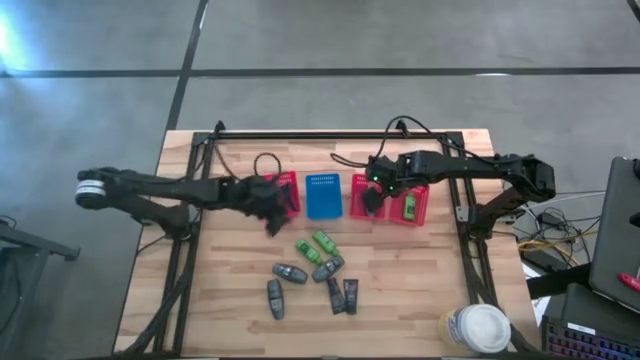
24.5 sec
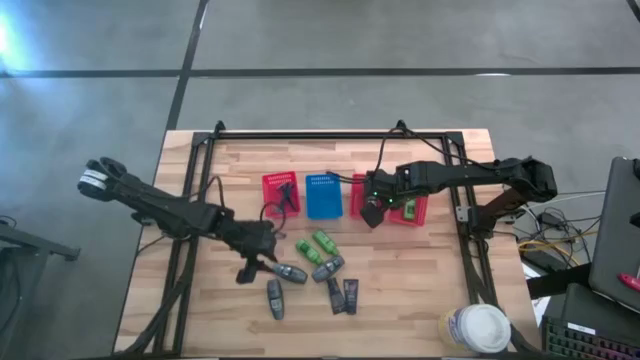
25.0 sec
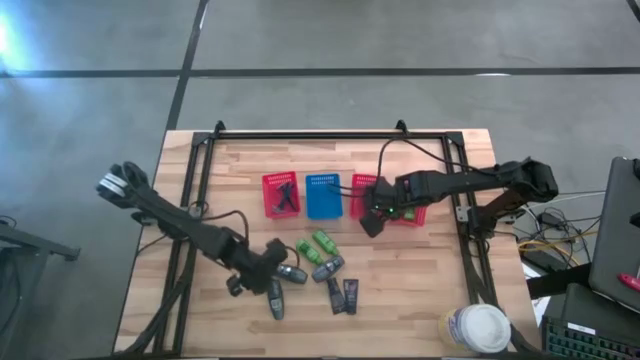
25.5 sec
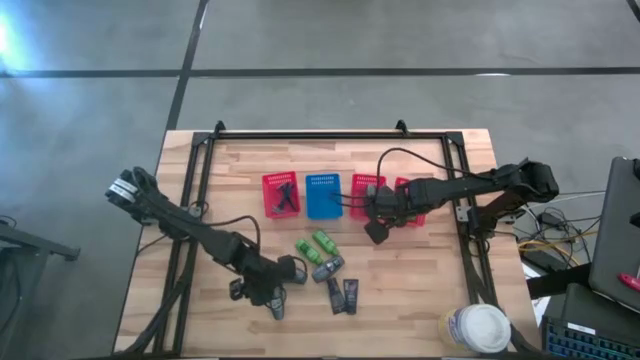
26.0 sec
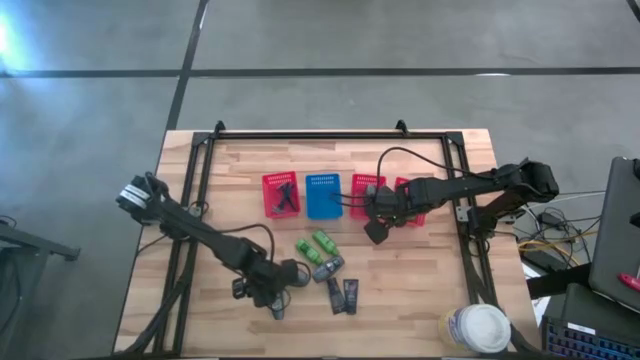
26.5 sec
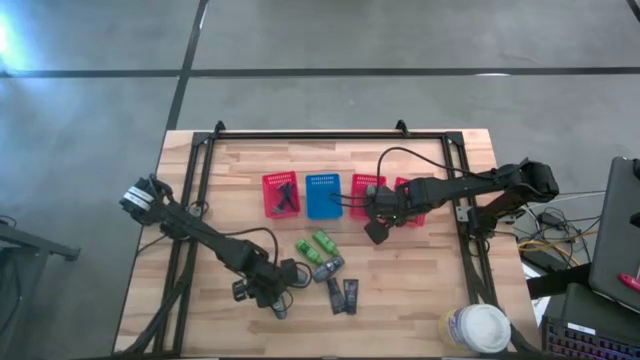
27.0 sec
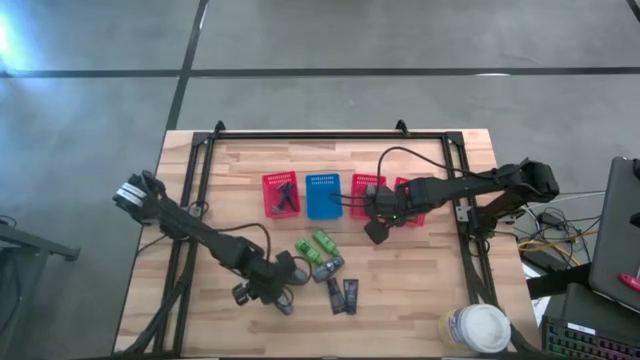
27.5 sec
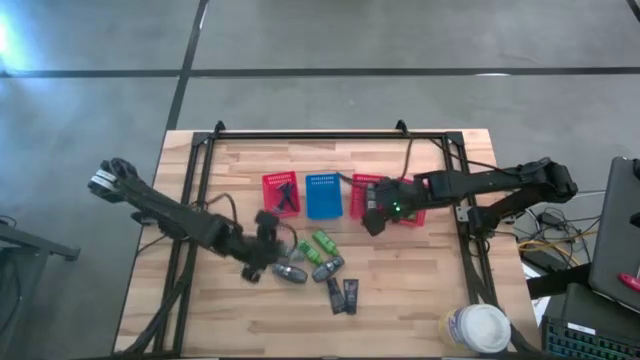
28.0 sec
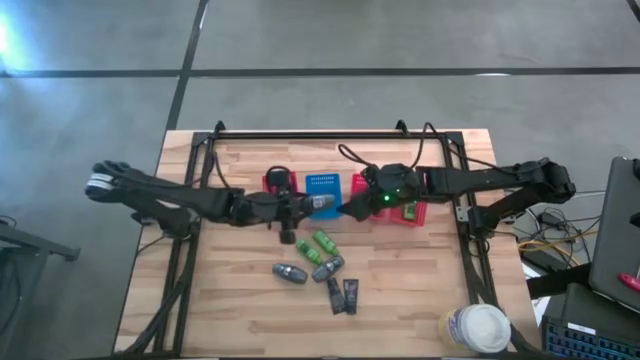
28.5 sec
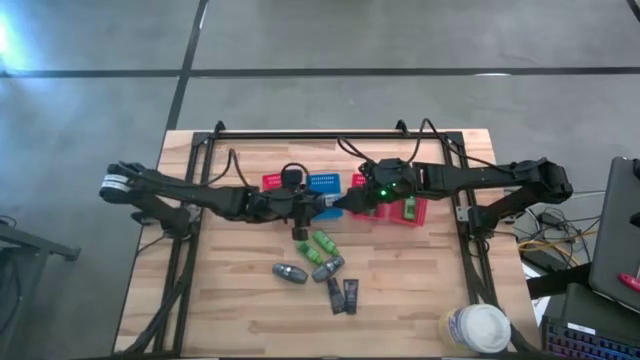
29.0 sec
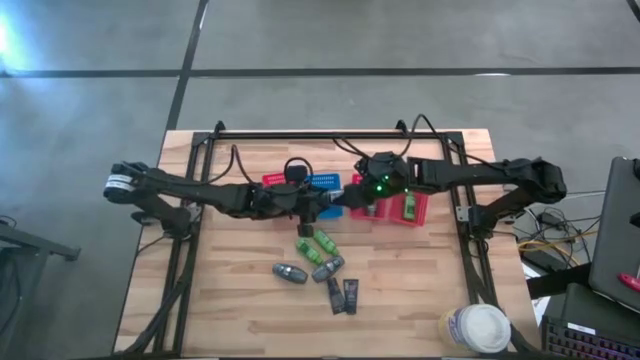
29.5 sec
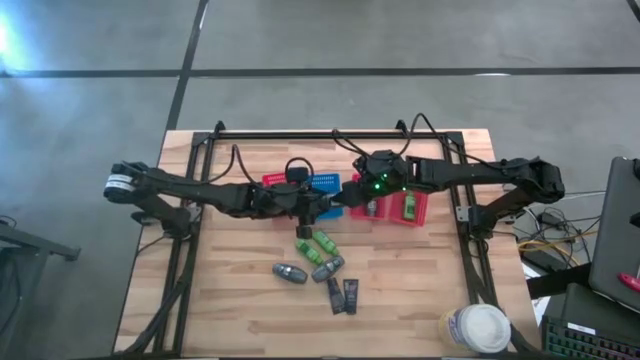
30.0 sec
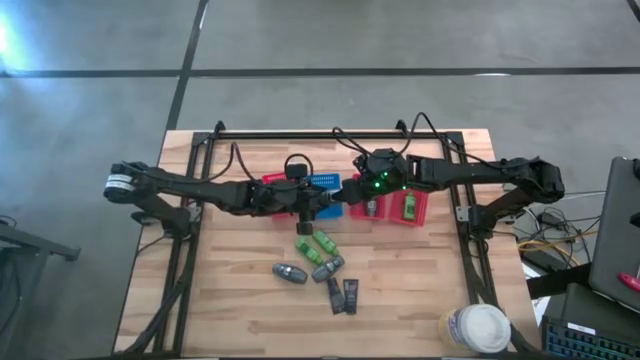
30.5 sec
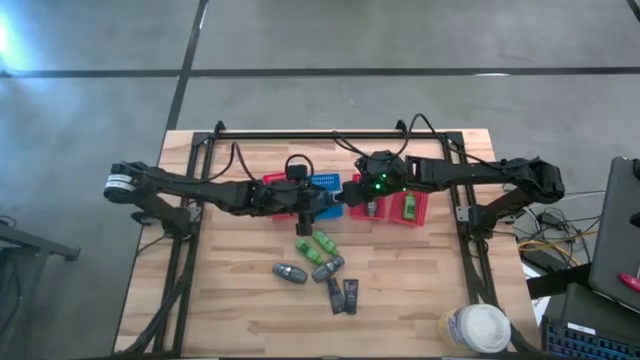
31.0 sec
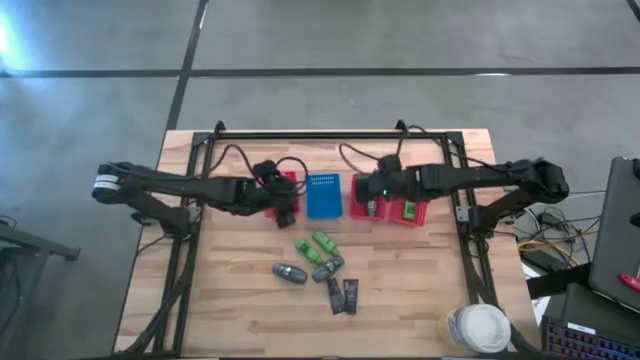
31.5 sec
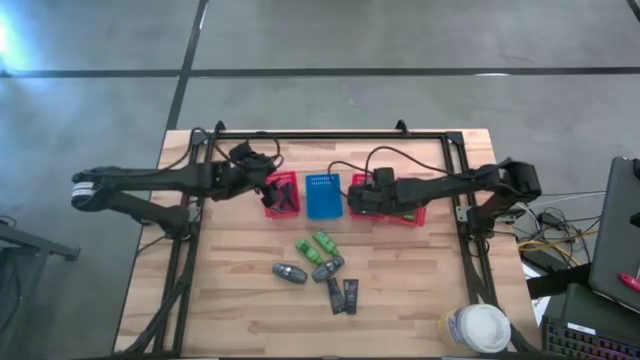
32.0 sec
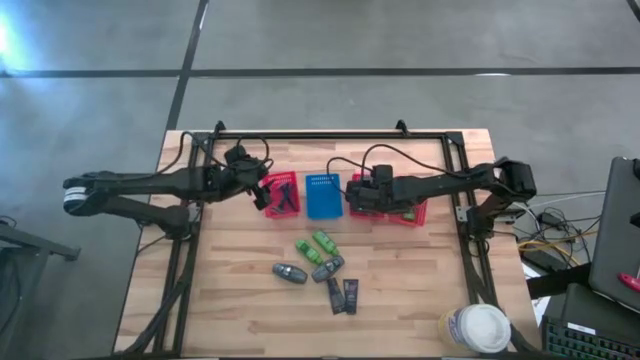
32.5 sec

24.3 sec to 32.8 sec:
Task: Pick & Place Travel size toiletries
Put the gray deodorant into the middle red bin

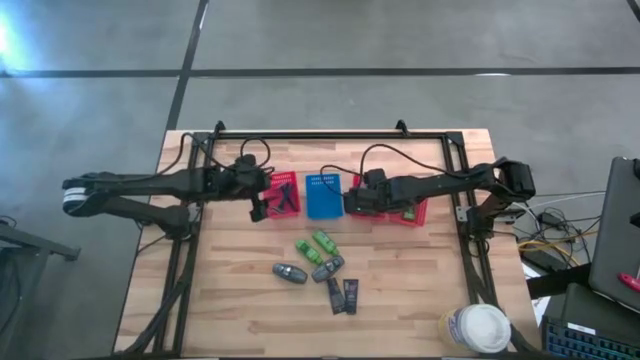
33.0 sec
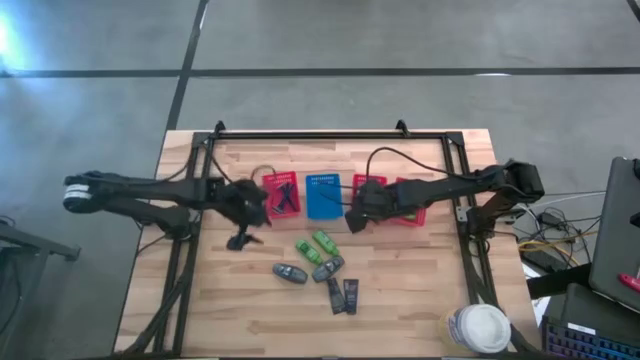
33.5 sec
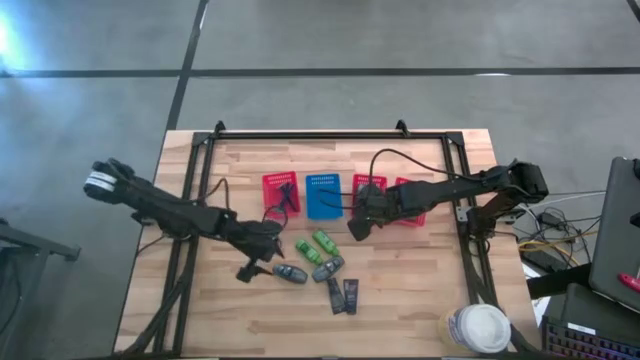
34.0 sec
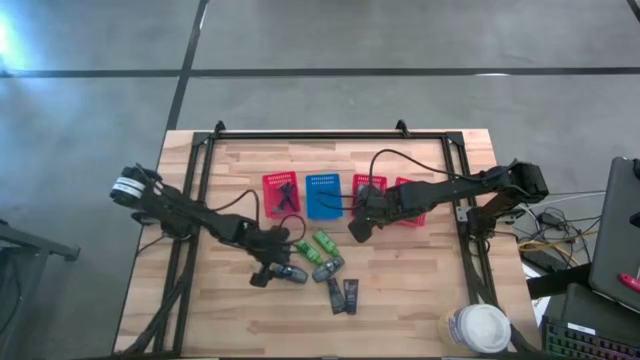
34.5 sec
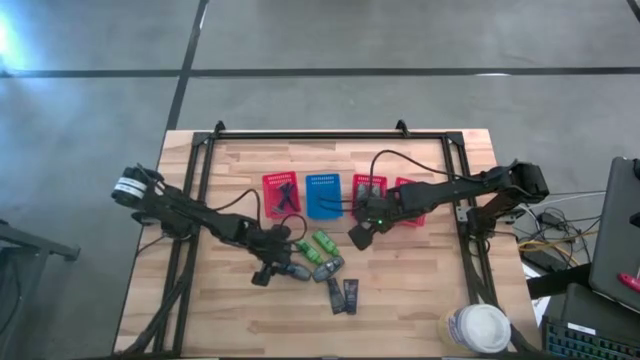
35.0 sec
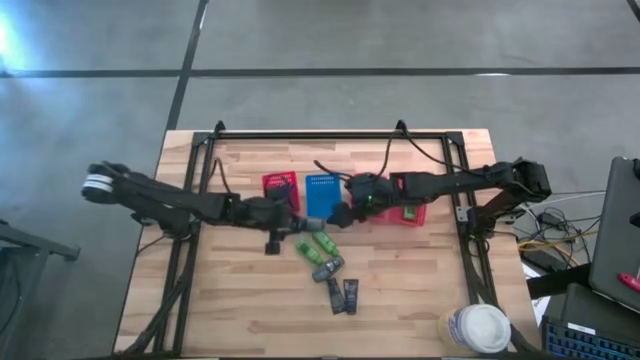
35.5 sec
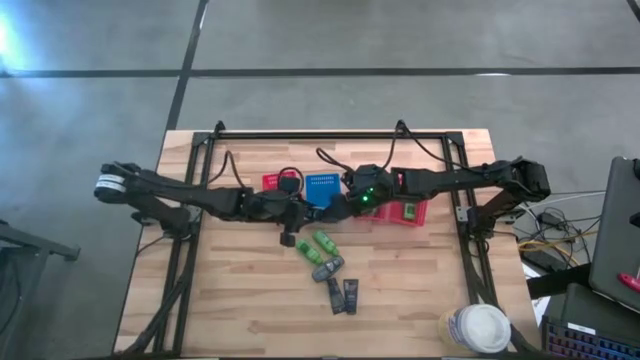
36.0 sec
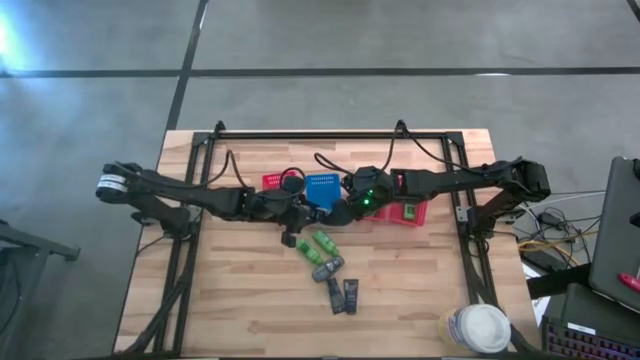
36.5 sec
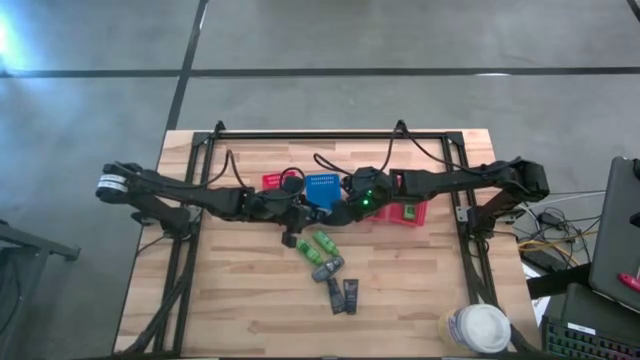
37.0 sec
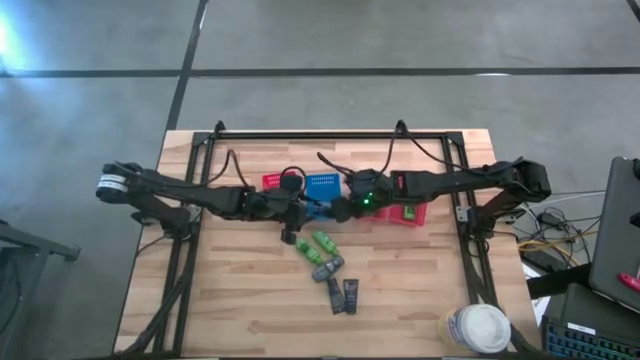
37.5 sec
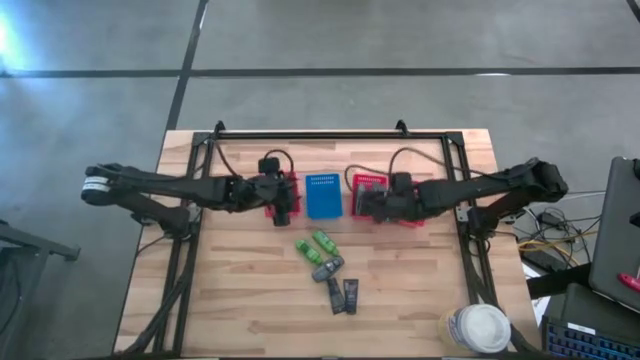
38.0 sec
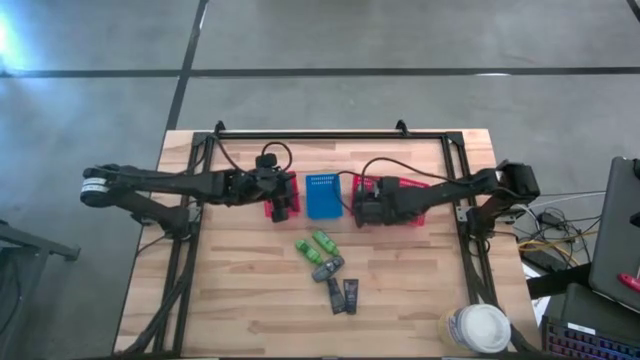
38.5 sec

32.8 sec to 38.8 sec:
Put the gray deodorant into the middle red bin

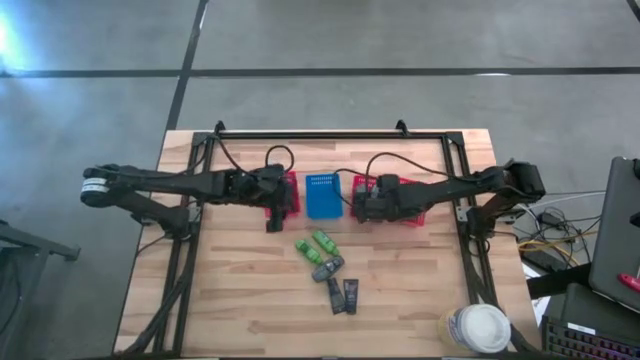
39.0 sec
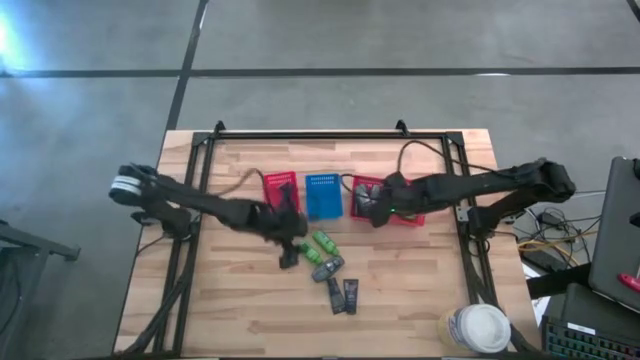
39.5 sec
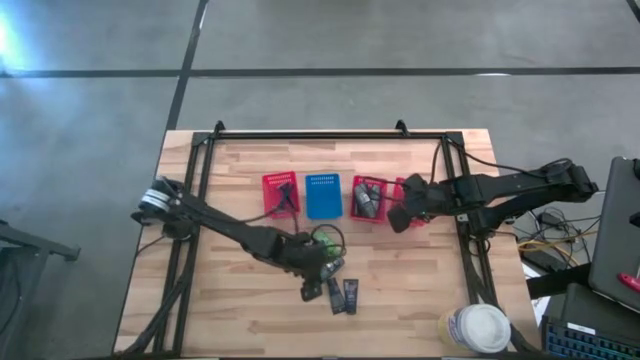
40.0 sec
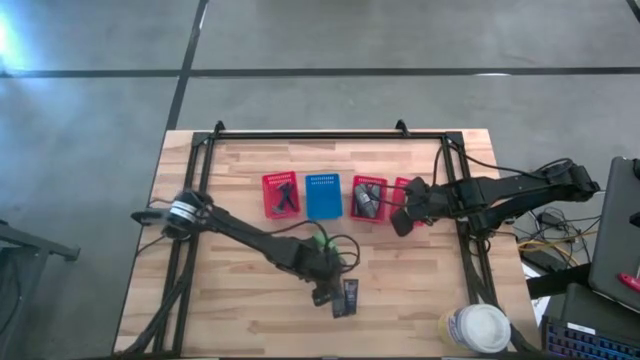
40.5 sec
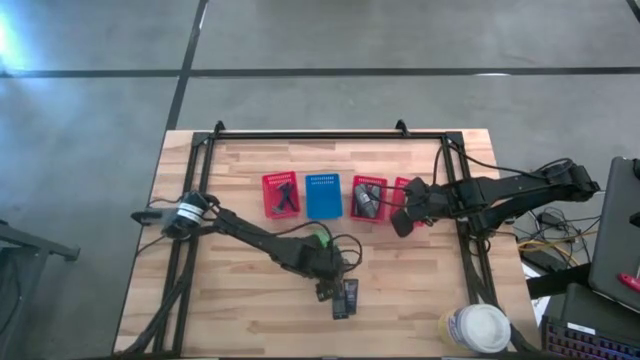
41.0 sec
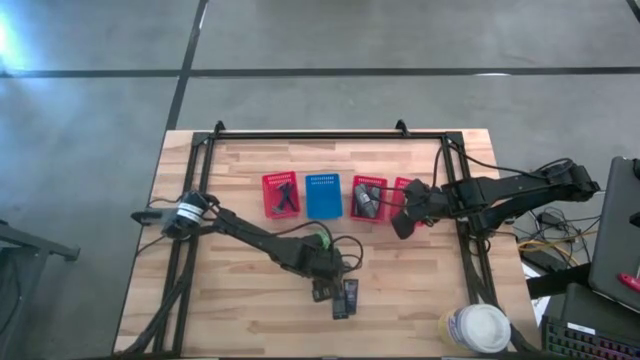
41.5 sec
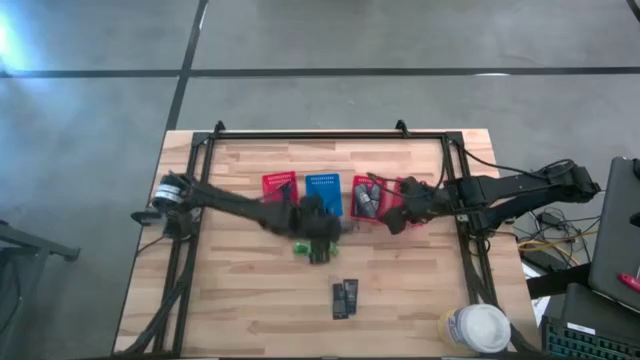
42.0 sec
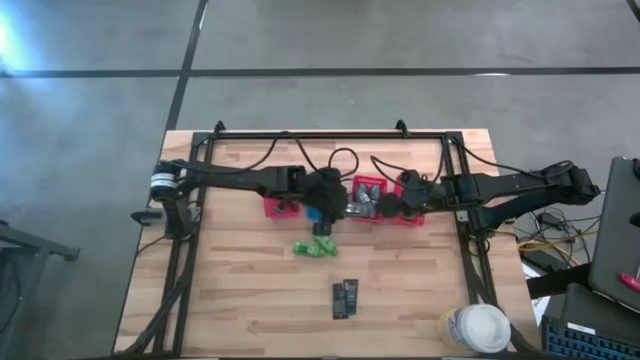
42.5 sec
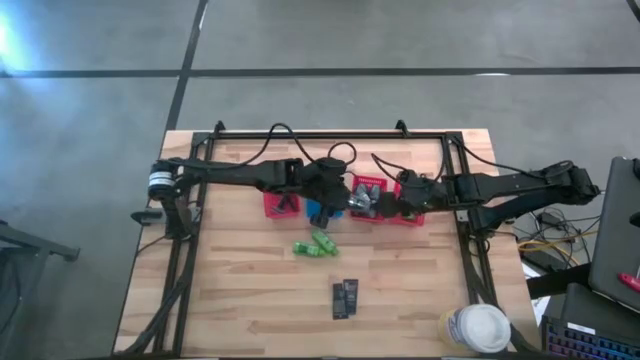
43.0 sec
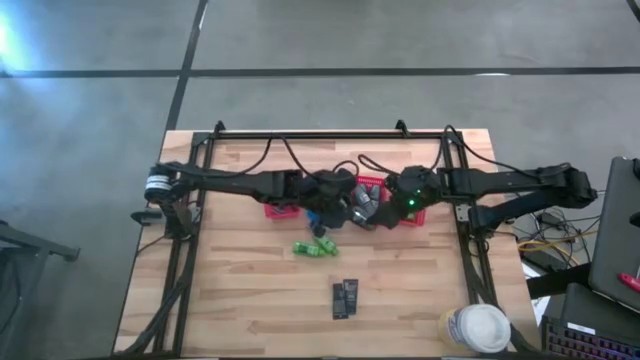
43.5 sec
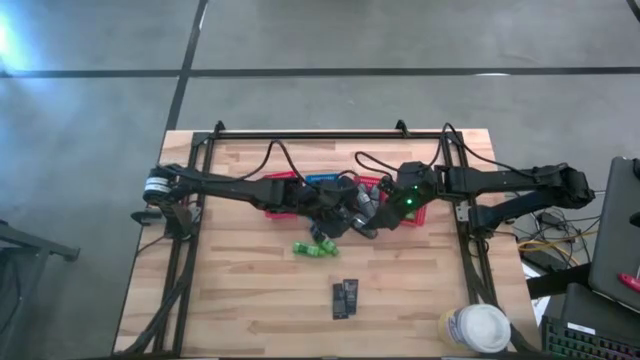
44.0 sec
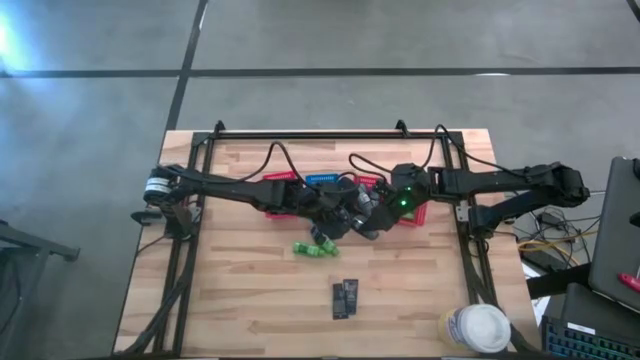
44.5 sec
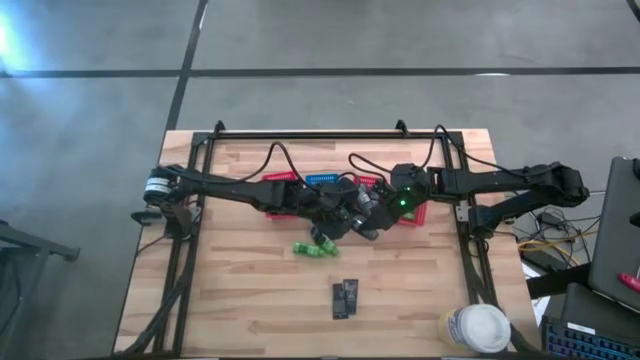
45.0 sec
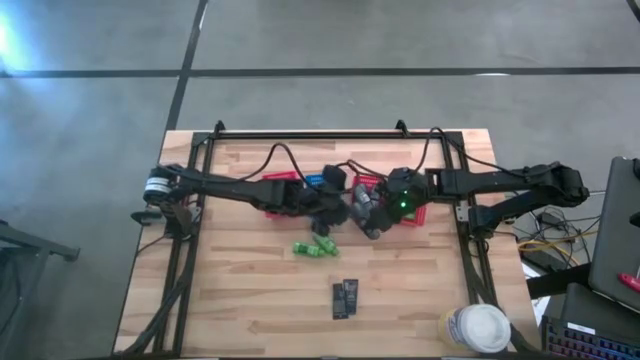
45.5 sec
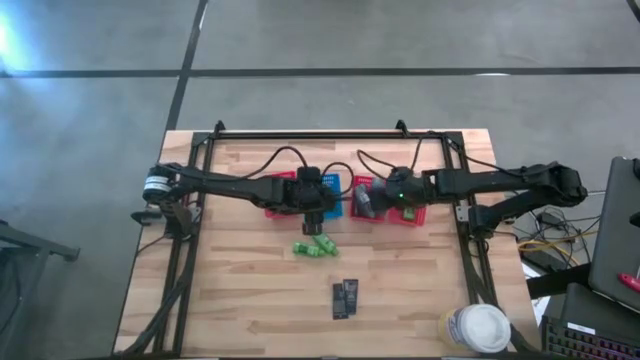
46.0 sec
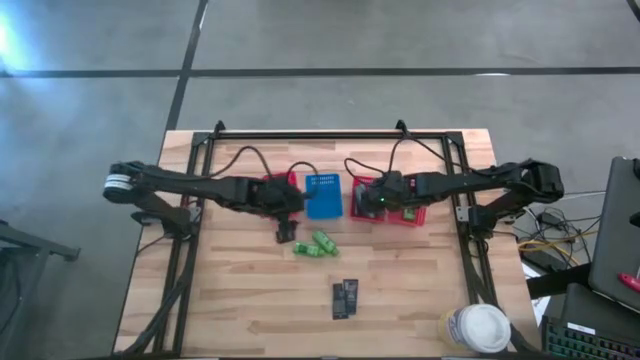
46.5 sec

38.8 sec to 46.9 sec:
Put the gray deodorant into the middle red bin
